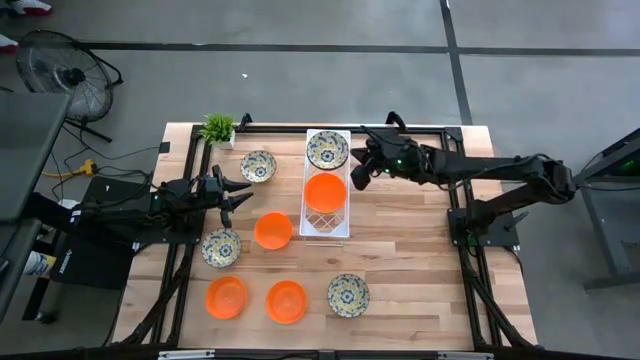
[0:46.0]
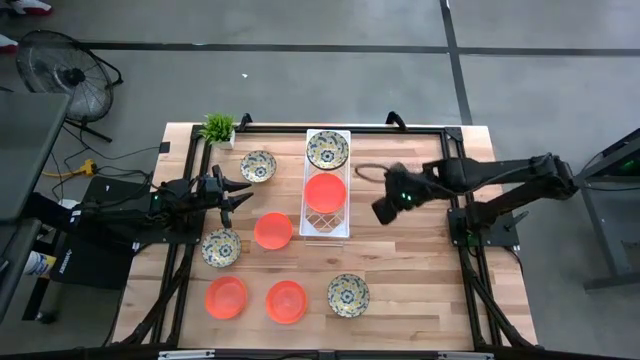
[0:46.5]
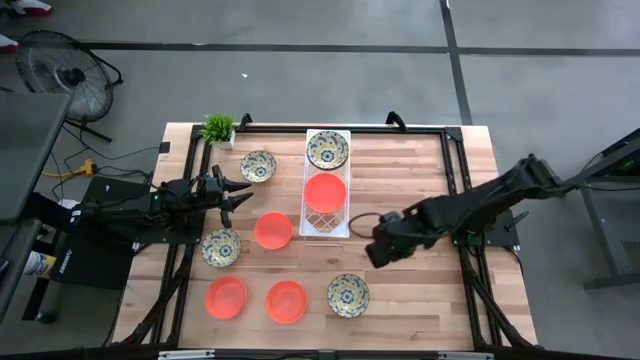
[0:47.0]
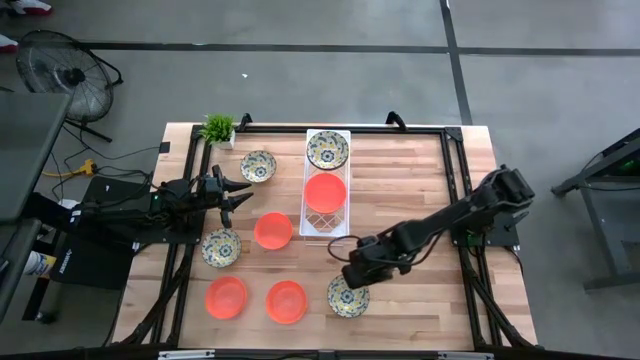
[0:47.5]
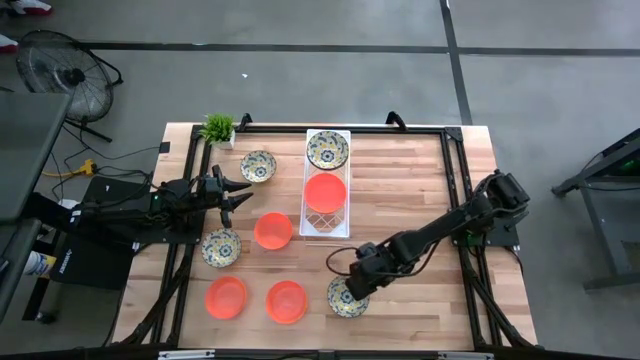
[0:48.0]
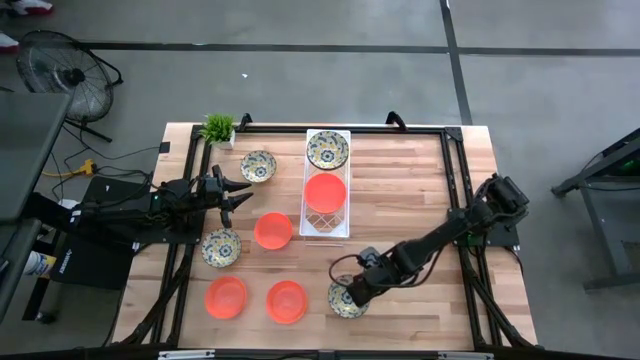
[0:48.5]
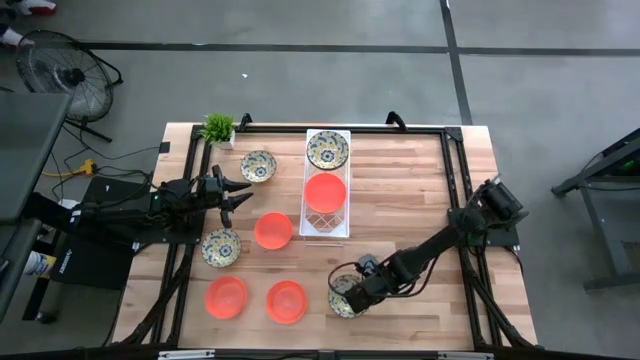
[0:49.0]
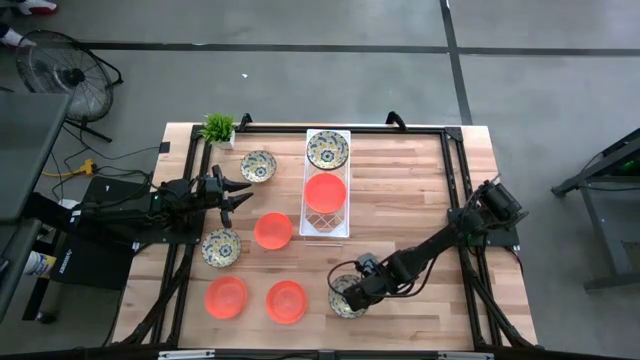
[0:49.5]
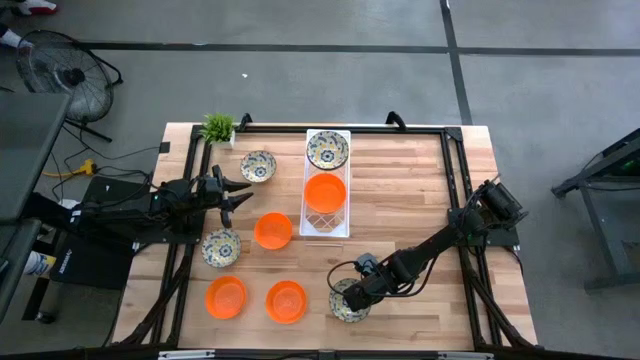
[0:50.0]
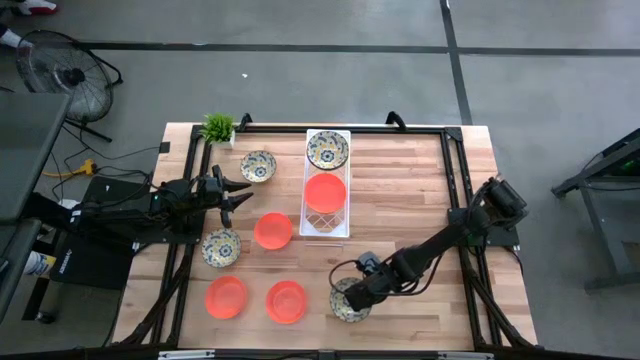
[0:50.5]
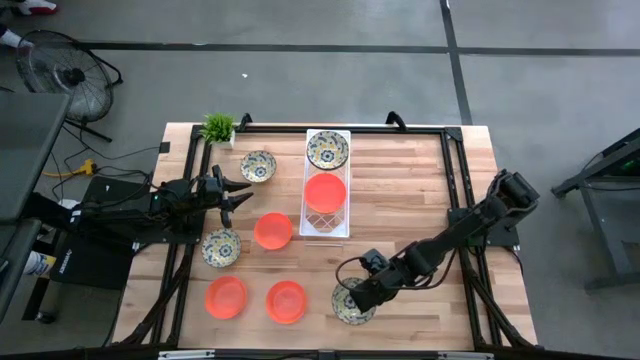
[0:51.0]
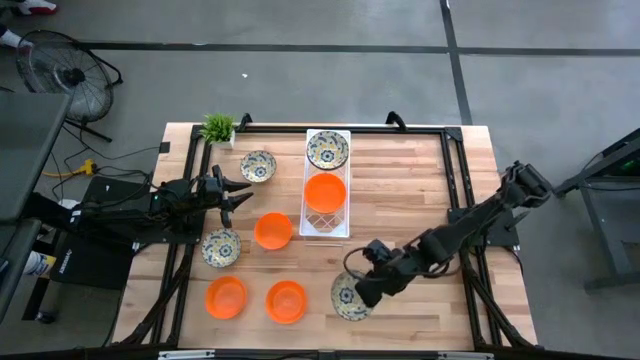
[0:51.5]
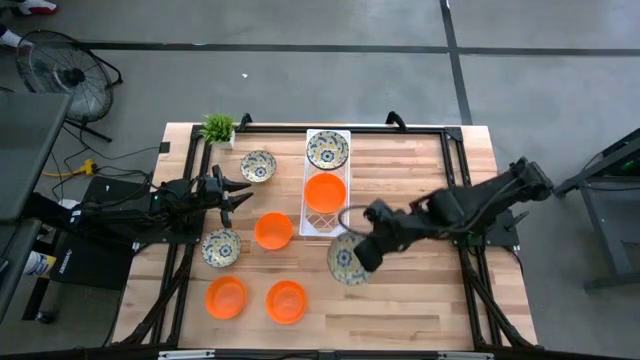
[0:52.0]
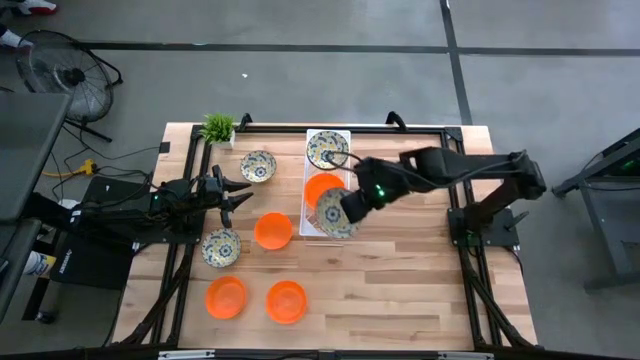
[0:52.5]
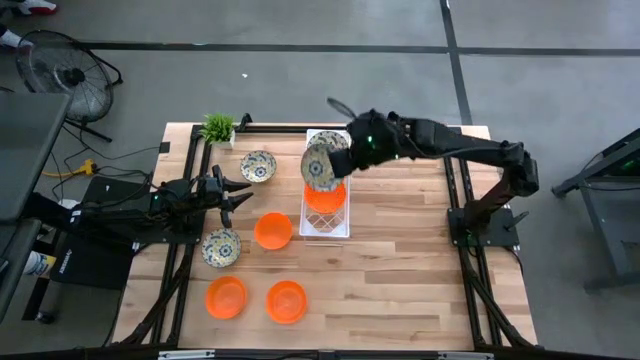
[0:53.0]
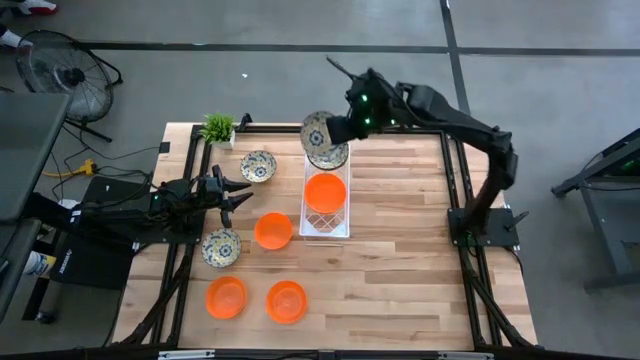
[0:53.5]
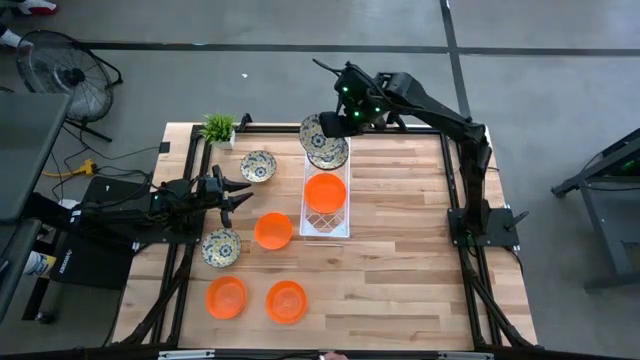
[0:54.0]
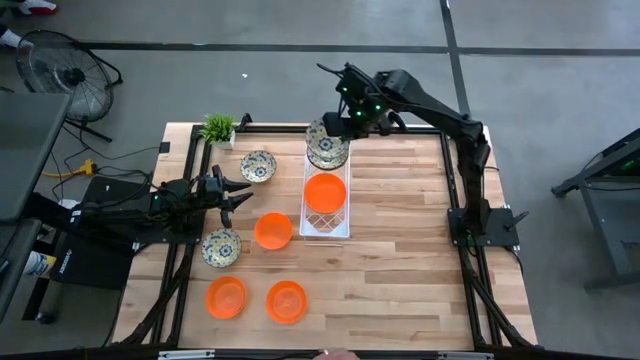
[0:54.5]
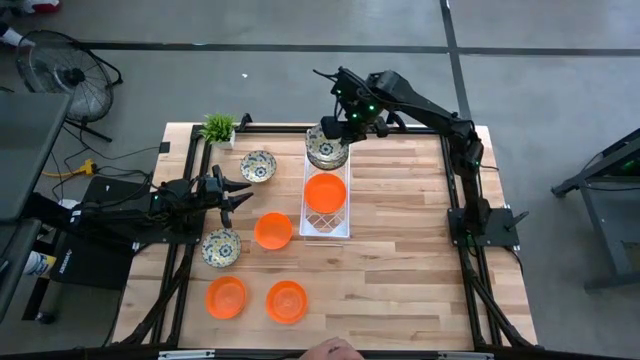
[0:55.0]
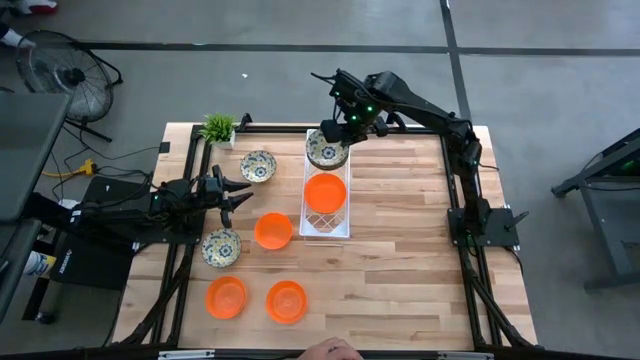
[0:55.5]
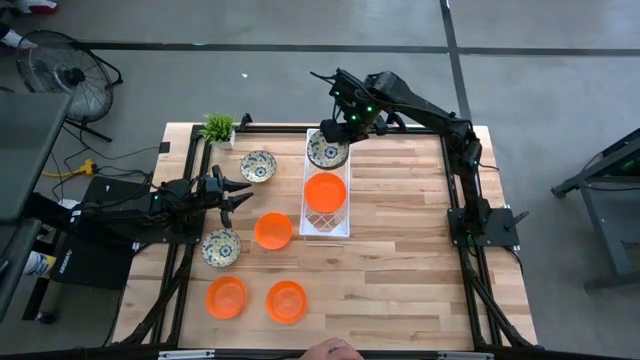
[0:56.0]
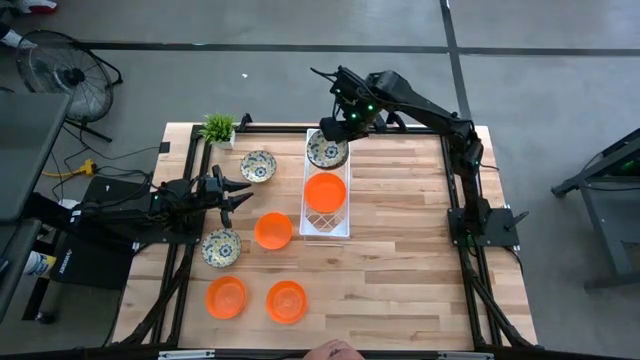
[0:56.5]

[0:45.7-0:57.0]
Task: Pick & Place Mini bowls
Stack the yellow bowl on top of the yellow bowl on the shelf

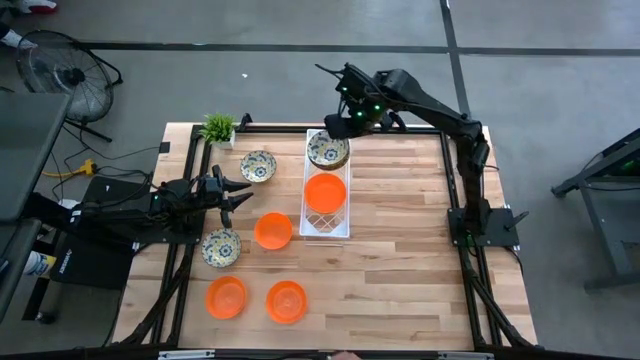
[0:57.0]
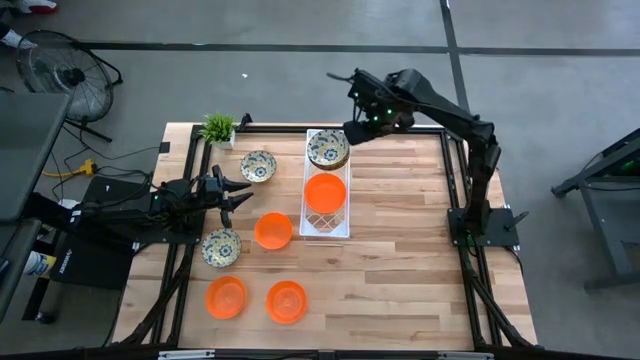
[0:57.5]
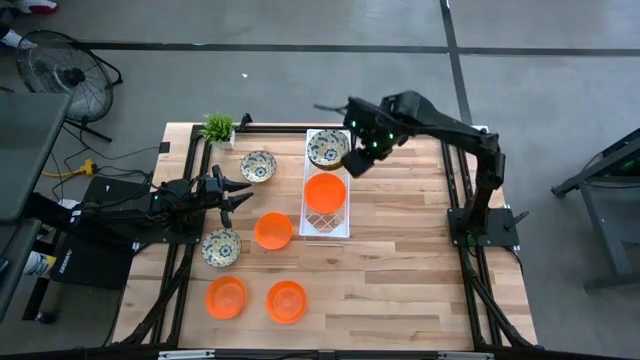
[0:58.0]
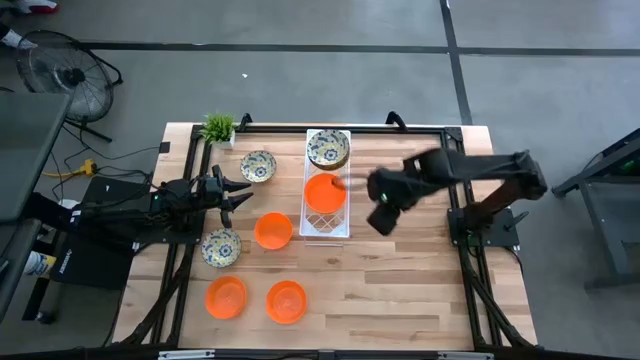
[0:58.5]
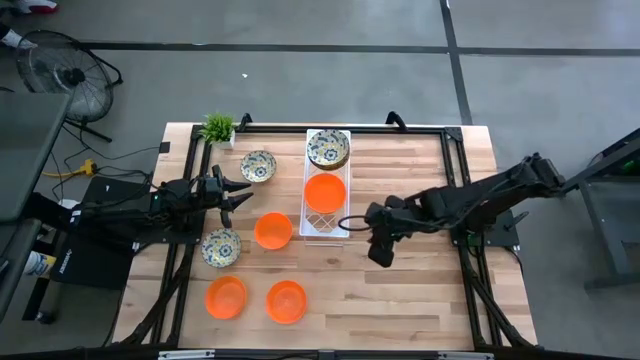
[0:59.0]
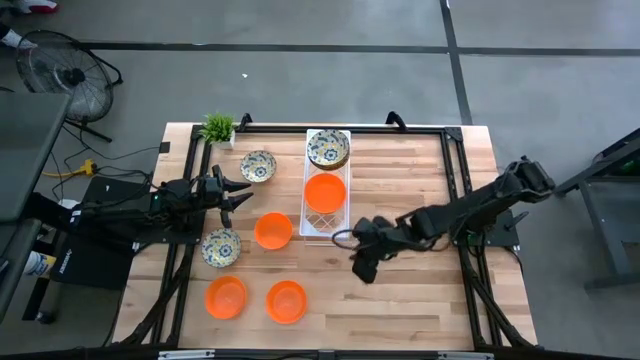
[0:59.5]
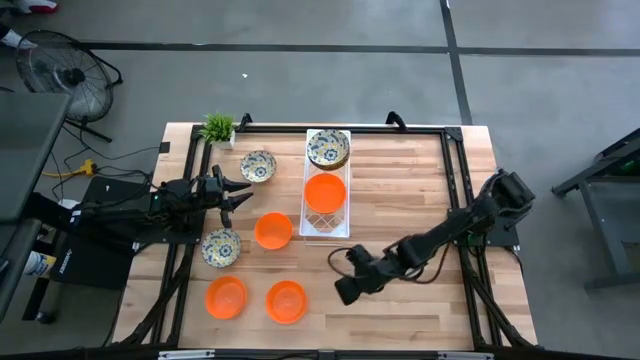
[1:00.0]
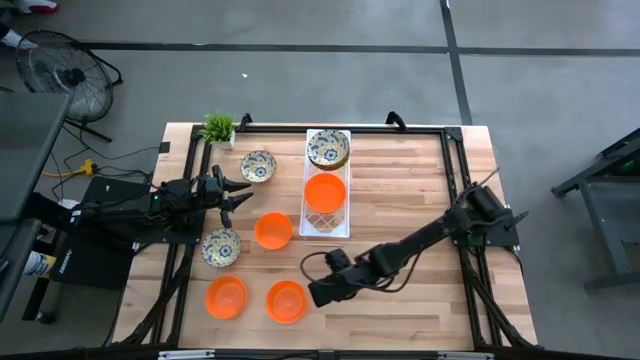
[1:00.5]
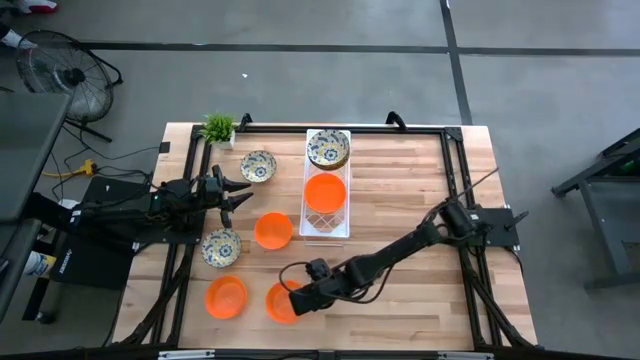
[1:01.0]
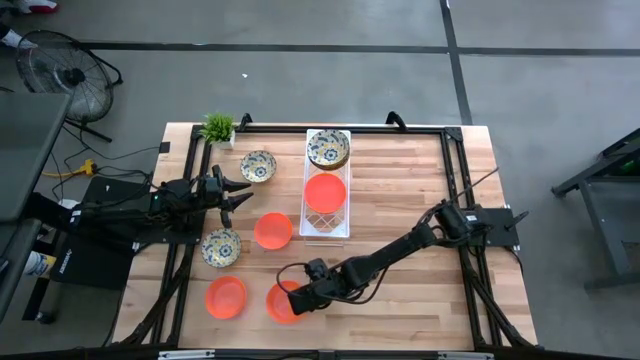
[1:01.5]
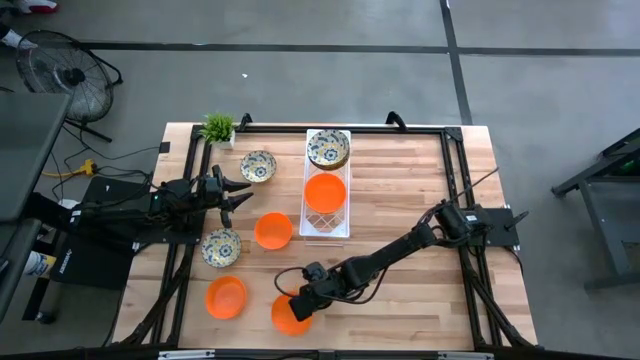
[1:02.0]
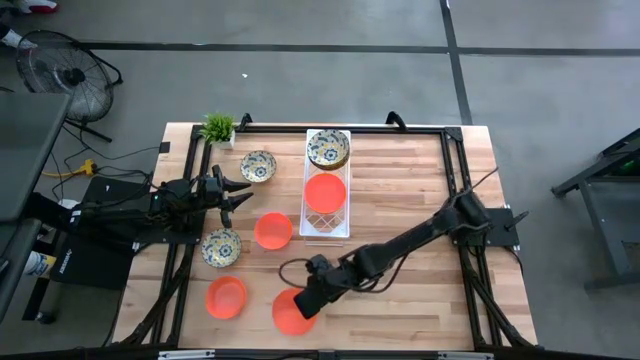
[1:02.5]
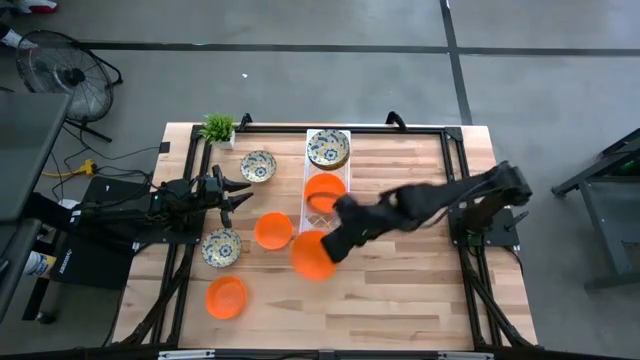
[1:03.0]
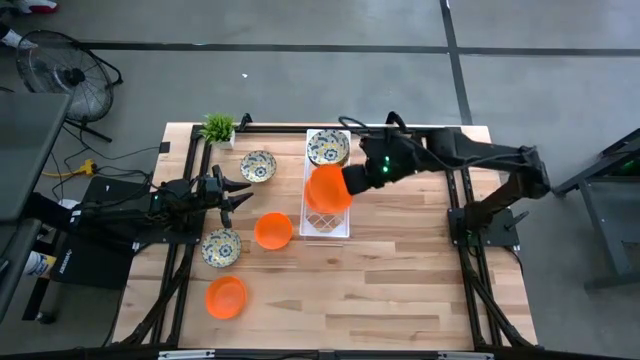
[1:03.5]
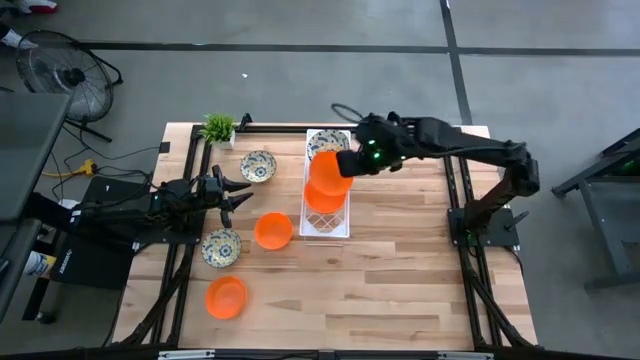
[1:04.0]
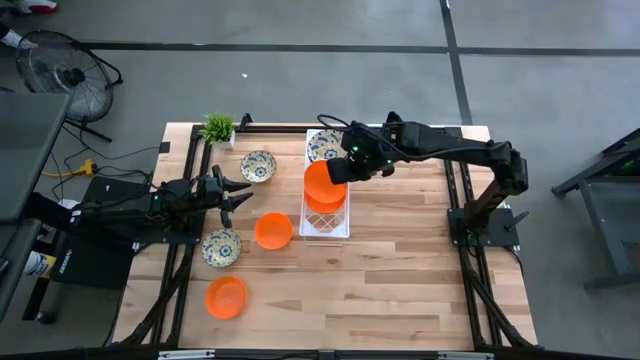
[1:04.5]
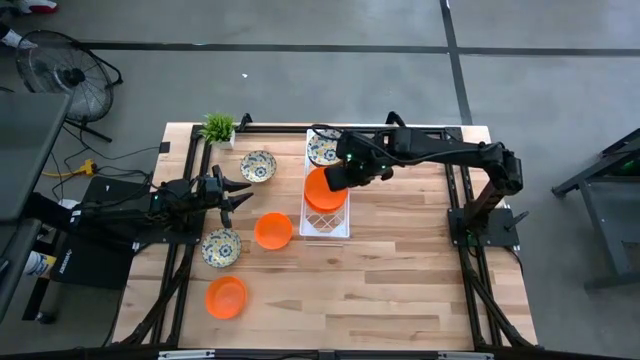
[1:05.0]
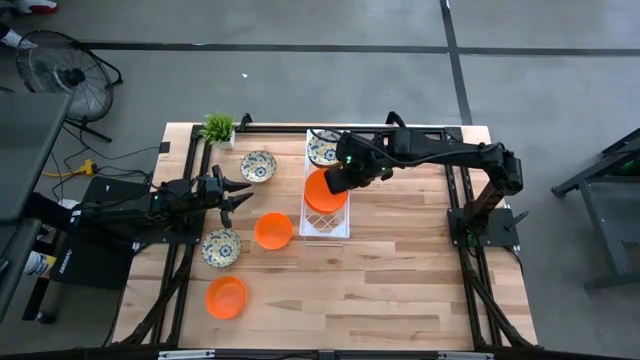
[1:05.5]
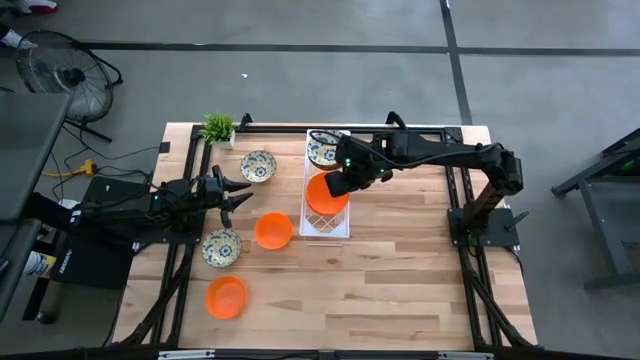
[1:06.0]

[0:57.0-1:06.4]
Stack the orange bowl on top of the orange bowl on the shelf

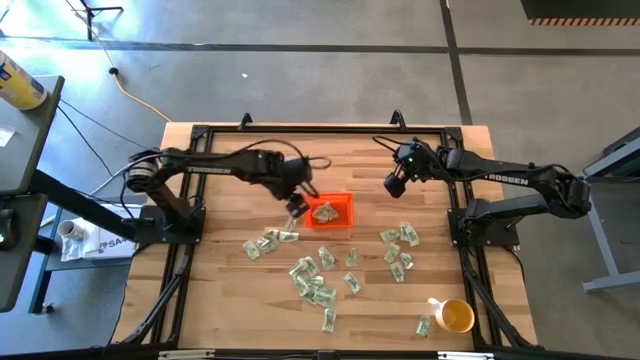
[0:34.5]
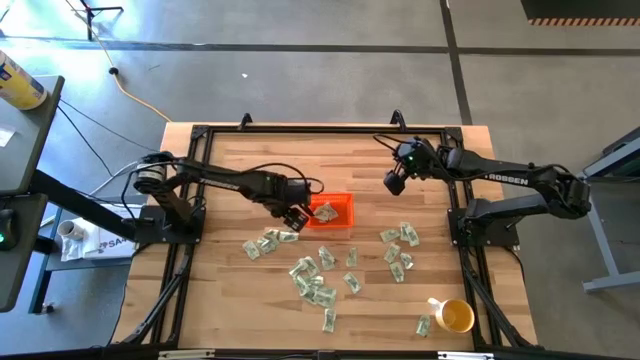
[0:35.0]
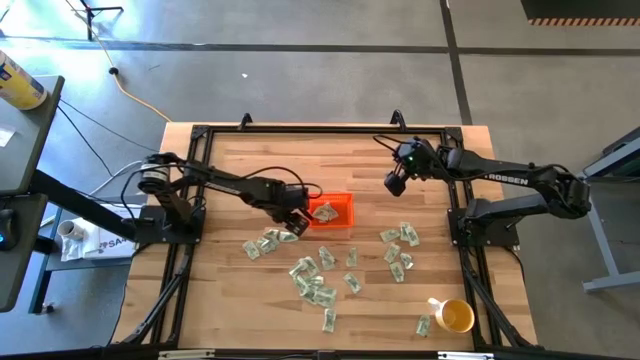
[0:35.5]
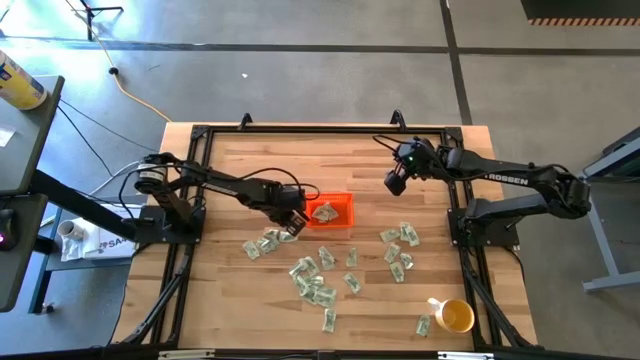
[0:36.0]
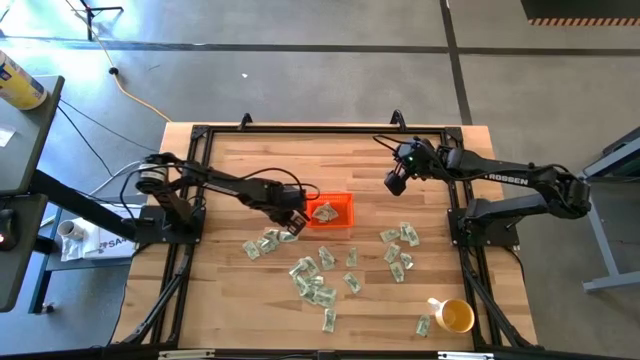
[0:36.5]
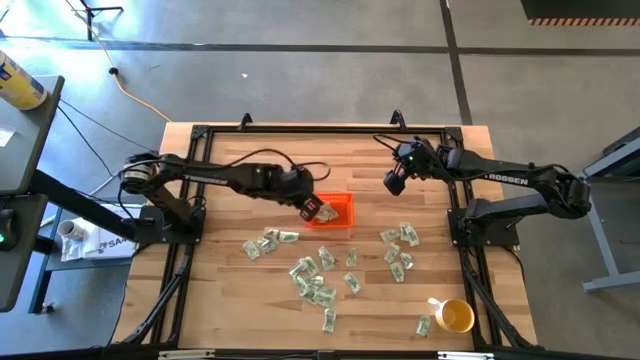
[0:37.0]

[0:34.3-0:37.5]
Task: Pick and place Stevia / Truvia into bins
Put the stevia packet into the orange bin
